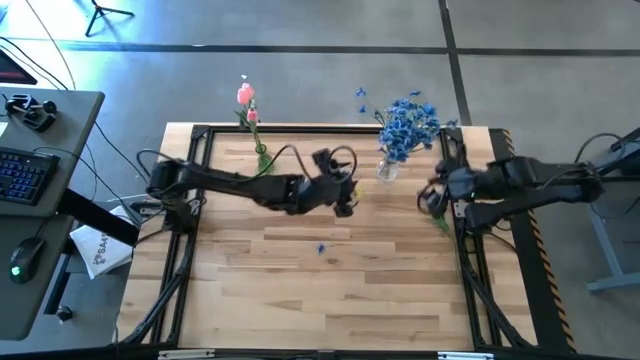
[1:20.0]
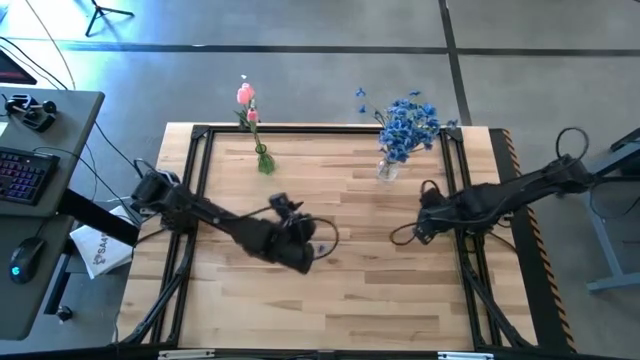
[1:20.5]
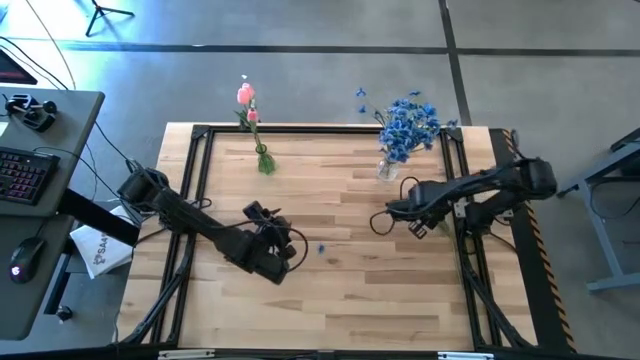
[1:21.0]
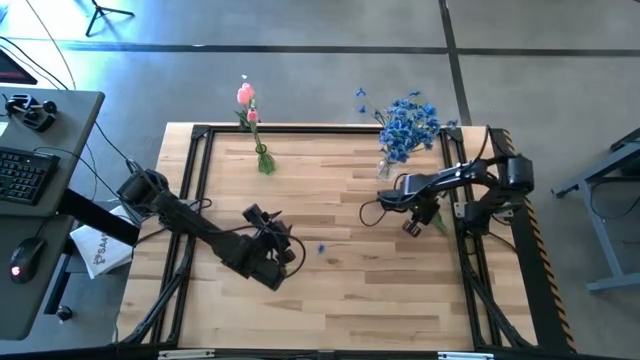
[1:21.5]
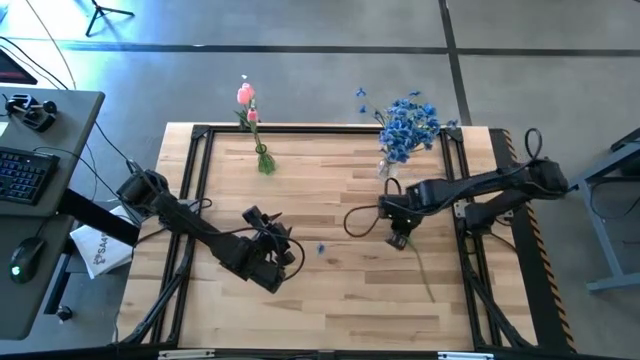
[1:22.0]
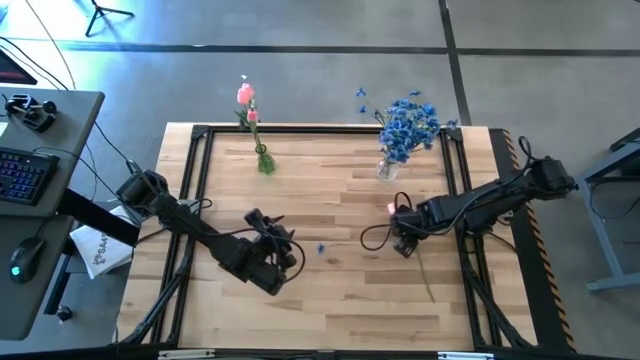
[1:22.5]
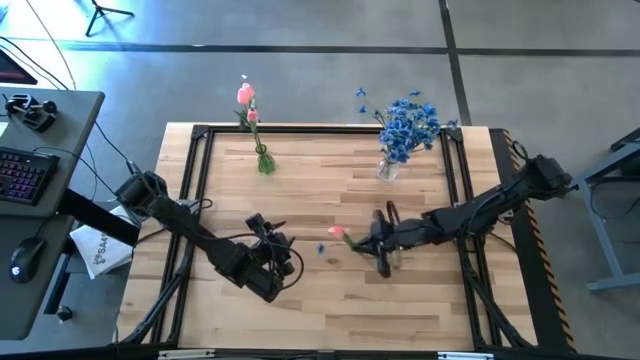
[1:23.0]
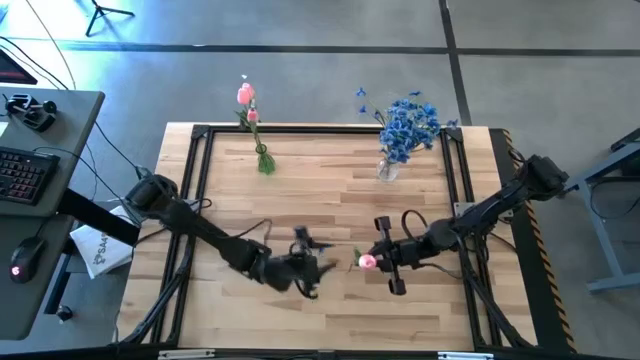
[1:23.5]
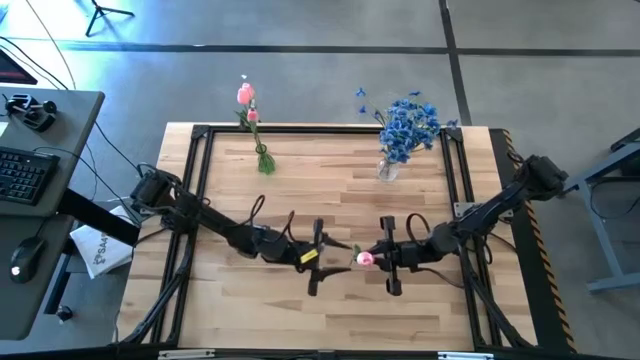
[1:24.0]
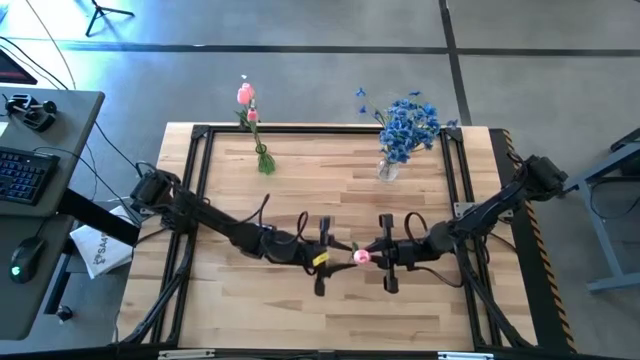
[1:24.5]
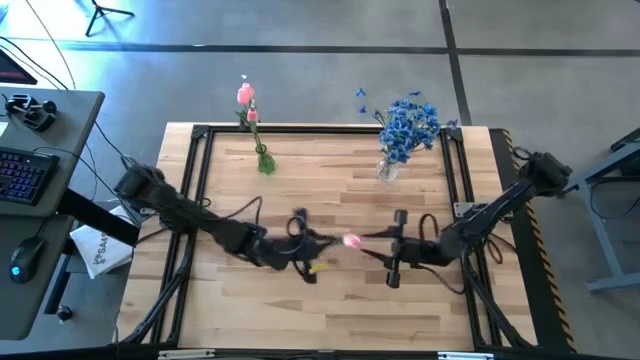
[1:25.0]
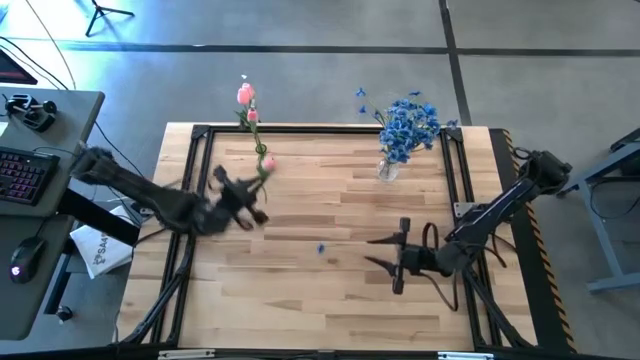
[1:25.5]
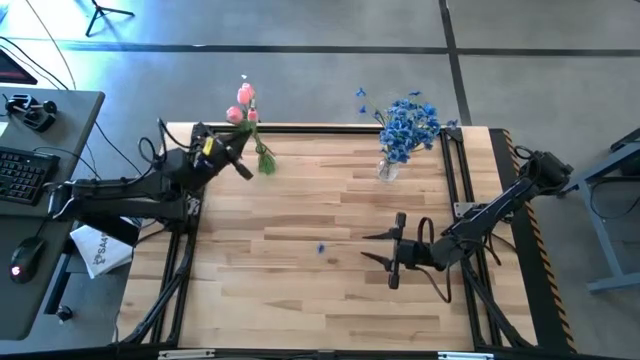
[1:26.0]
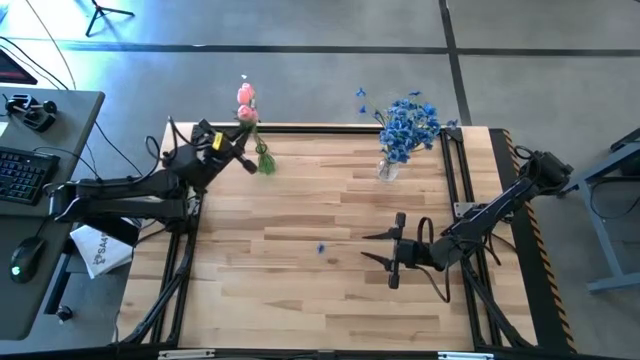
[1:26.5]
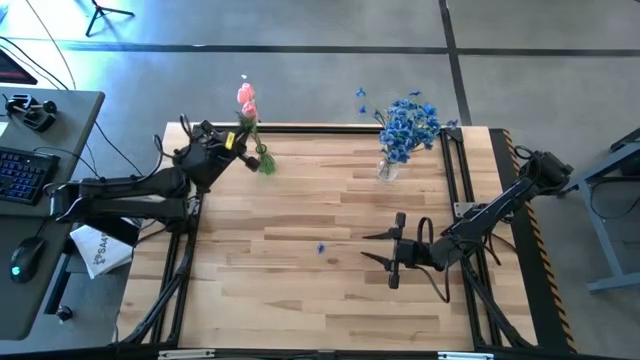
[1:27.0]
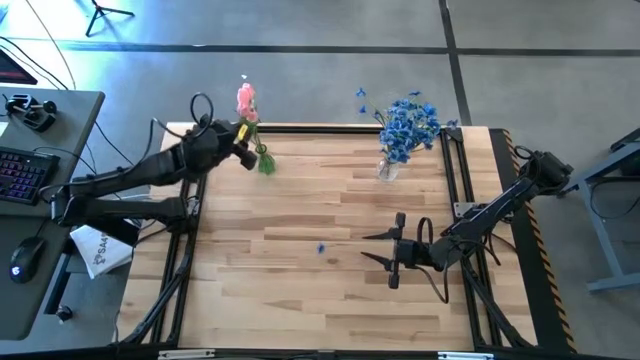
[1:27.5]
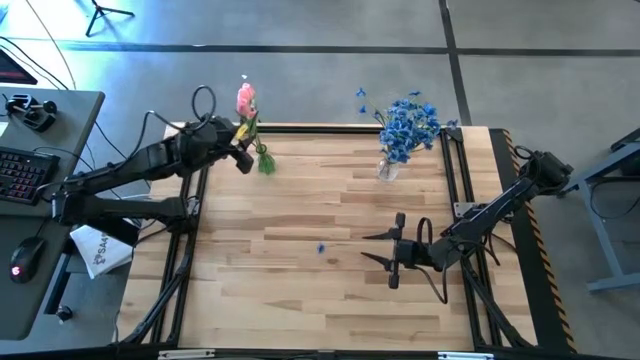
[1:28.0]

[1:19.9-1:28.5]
Task: Sort flowers into vase by color
Put the pink tulip into the green vase

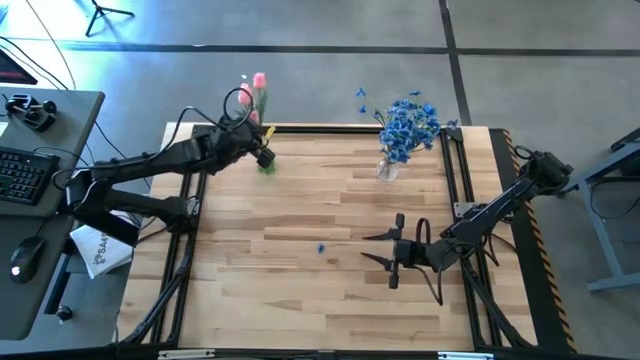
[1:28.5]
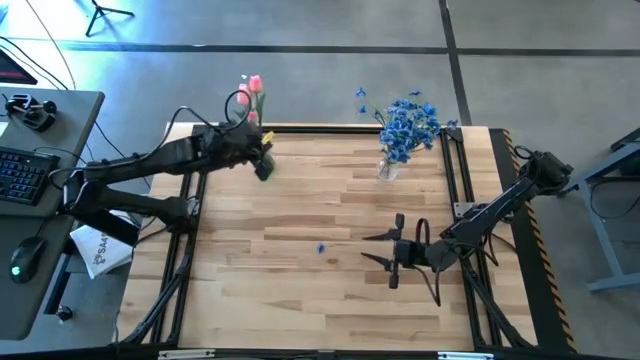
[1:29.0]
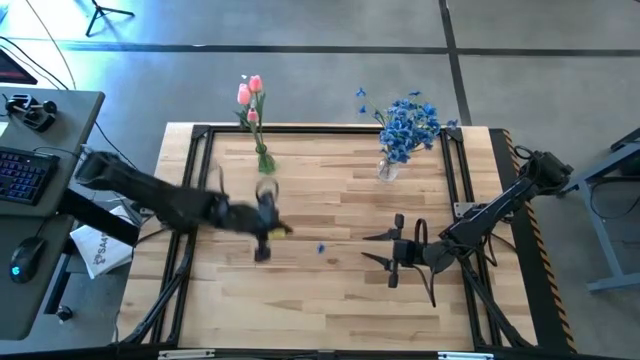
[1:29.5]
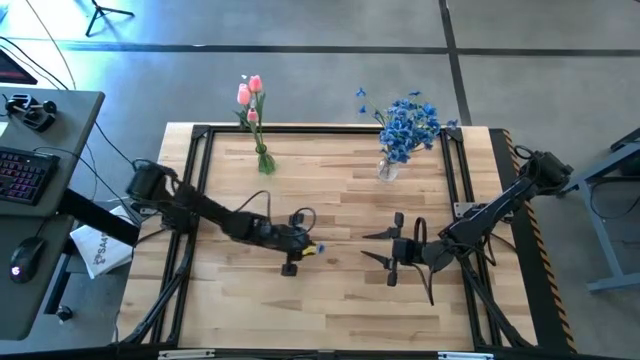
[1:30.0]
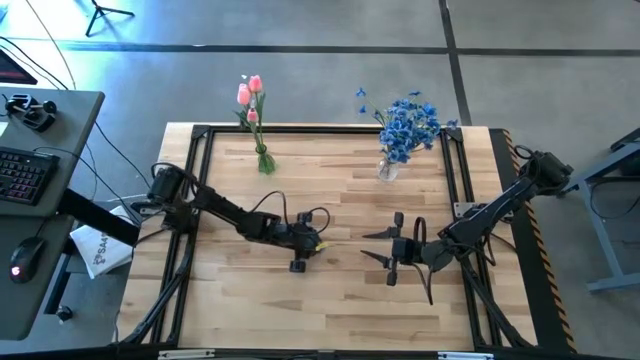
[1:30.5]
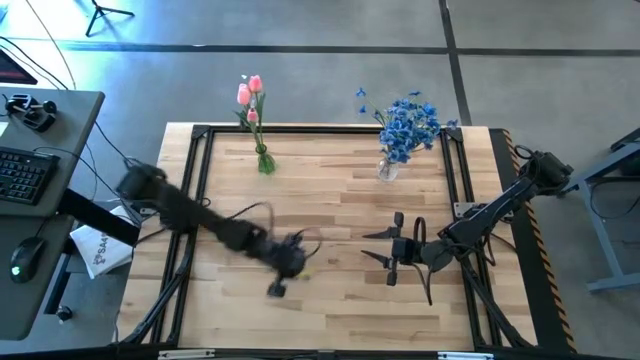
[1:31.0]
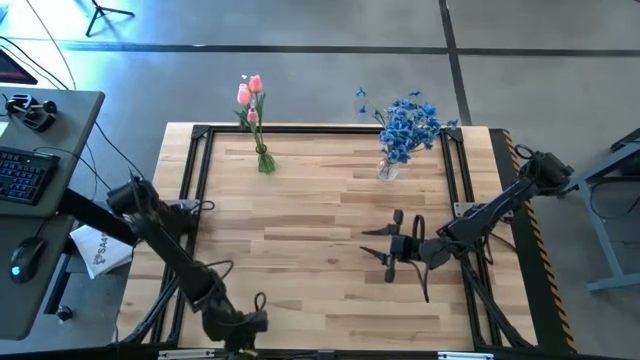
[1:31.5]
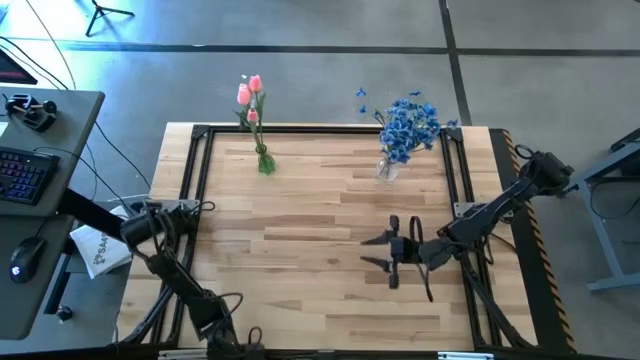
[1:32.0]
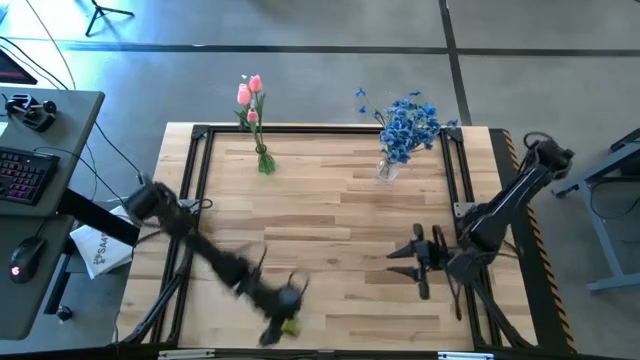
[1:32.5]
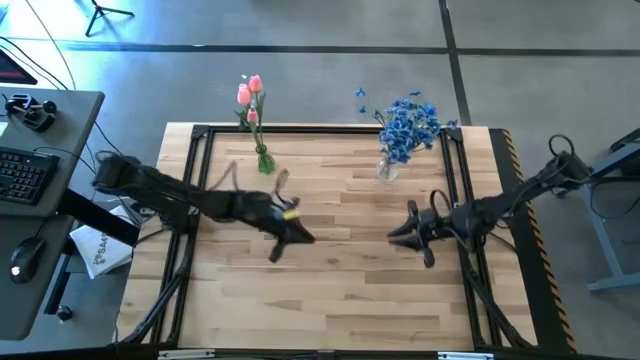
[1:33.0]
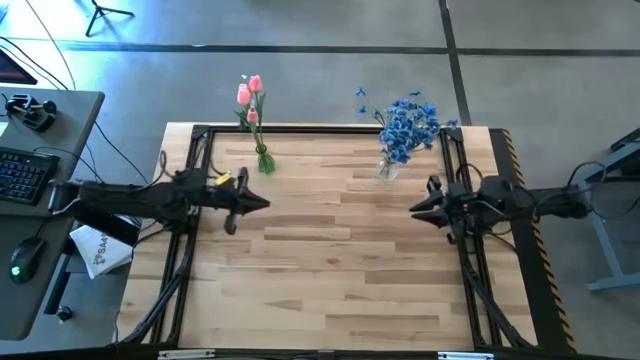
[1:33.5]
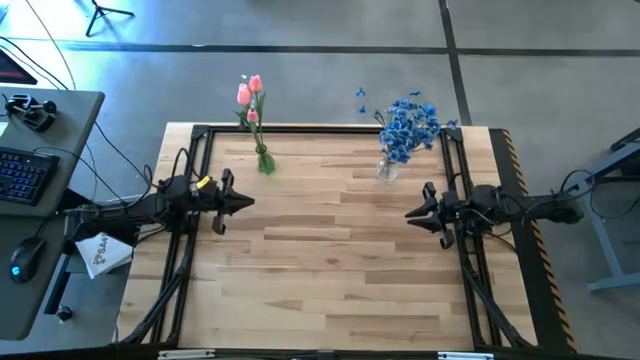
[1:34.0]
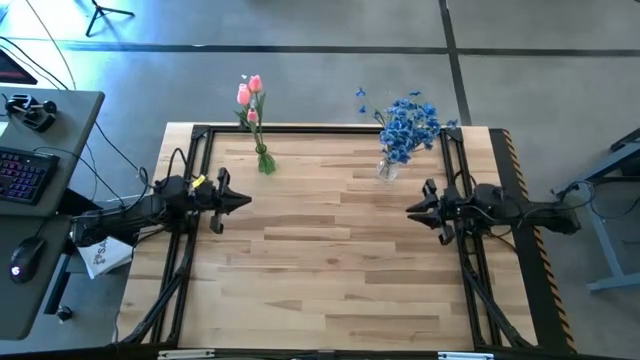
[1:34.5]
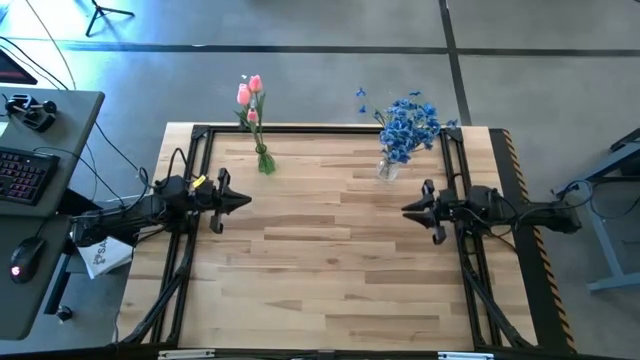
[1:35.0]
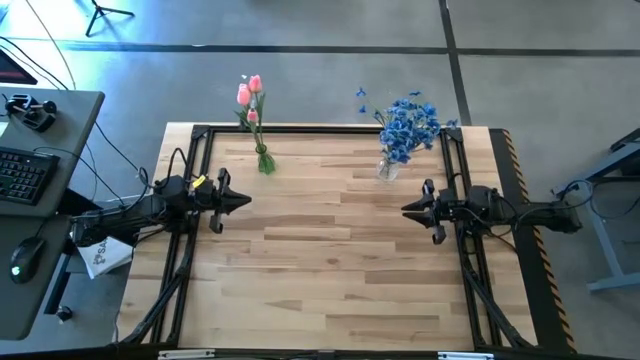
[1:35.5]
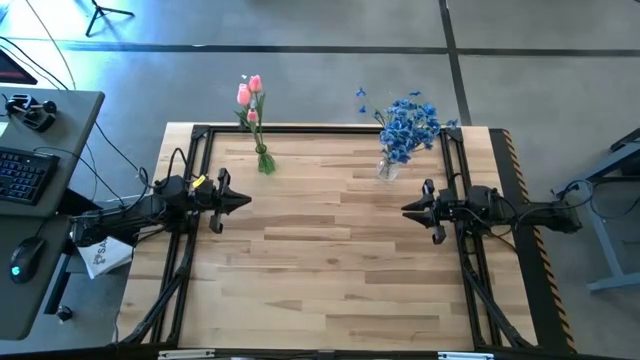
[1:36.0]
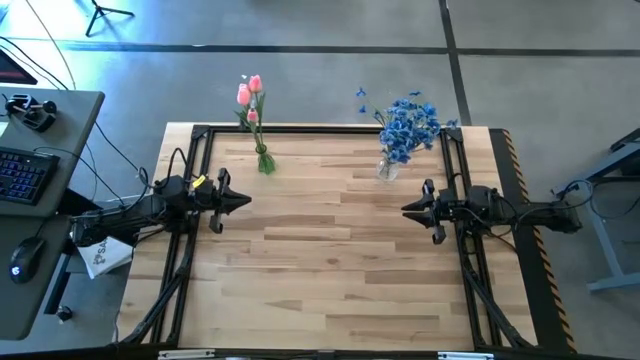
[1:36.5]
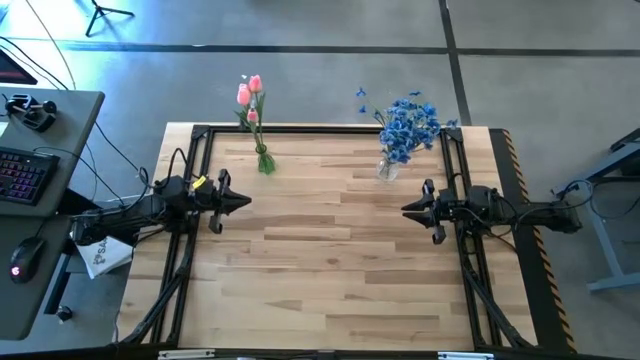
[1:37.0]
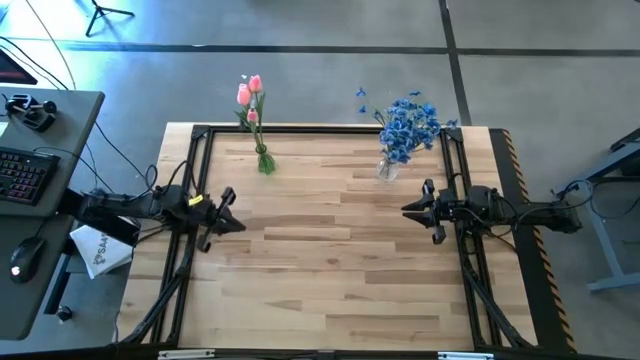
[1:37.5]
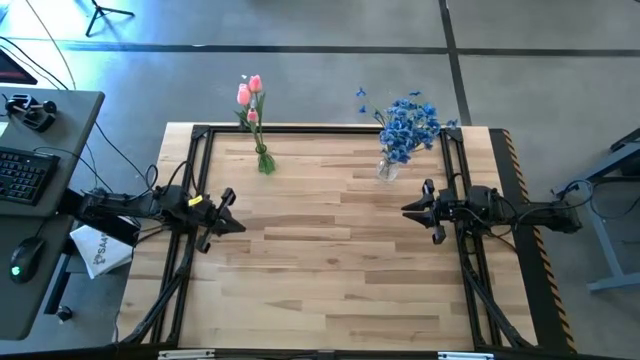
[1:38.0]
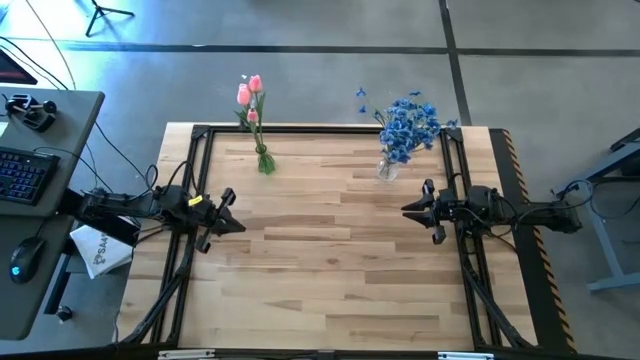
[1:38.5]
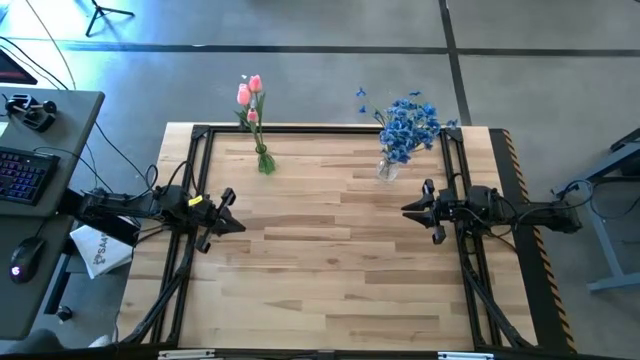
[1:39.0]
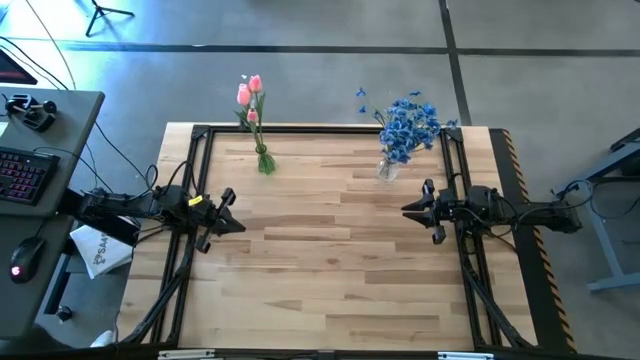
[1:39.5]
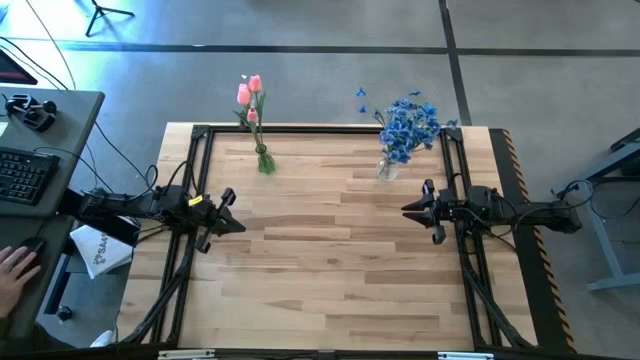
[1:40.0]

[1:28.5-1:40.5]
Return to Home Position

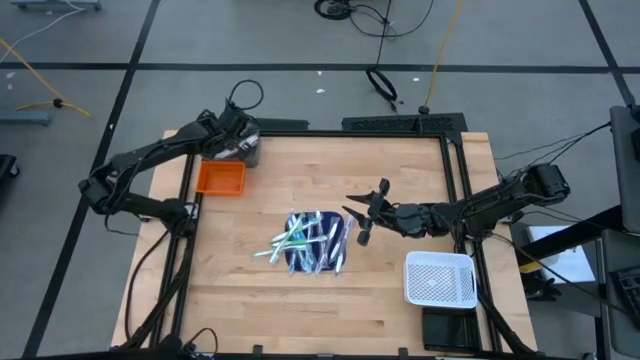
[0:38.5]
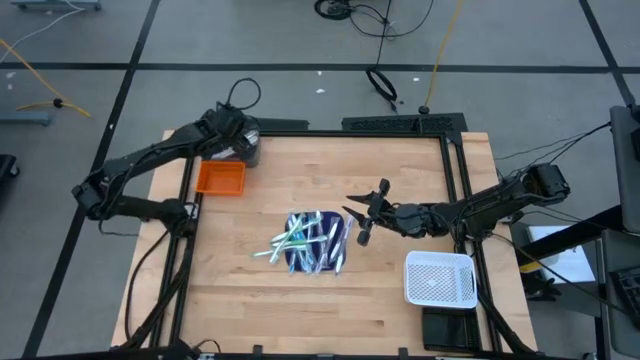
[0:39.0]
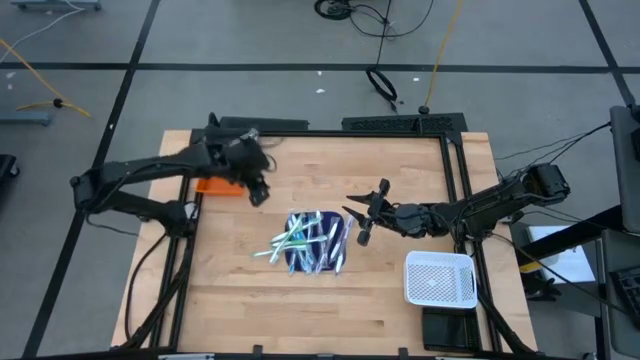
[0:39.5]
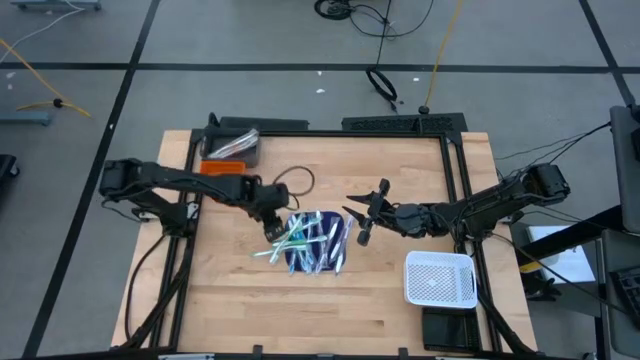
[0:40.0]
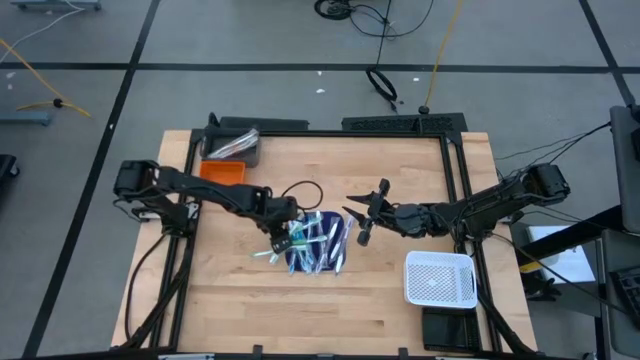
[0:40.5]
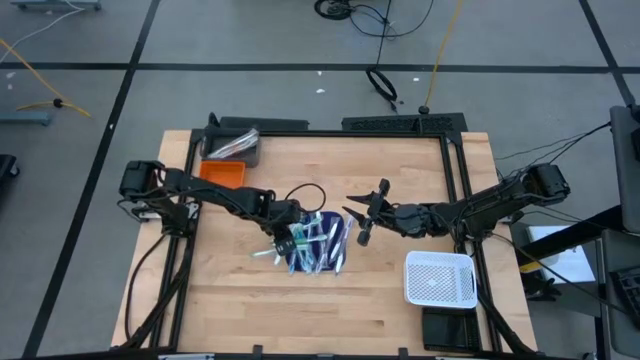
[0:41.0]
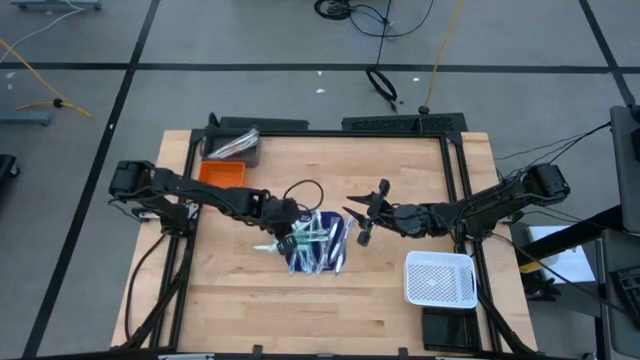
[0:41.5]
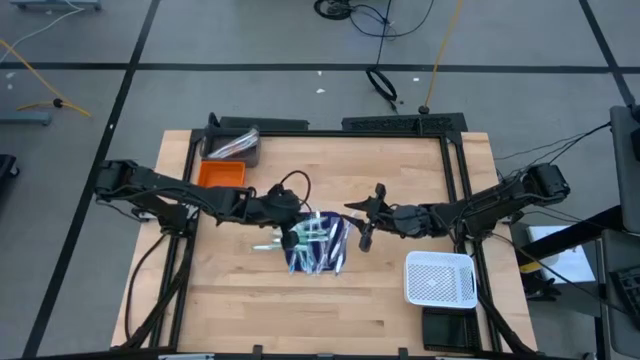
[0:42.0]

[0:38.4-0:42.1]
Task: Pick & Place Toothbrushes
Put the green toothbrush into the black bin
